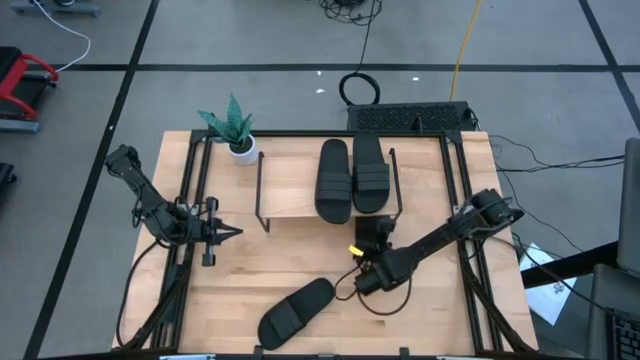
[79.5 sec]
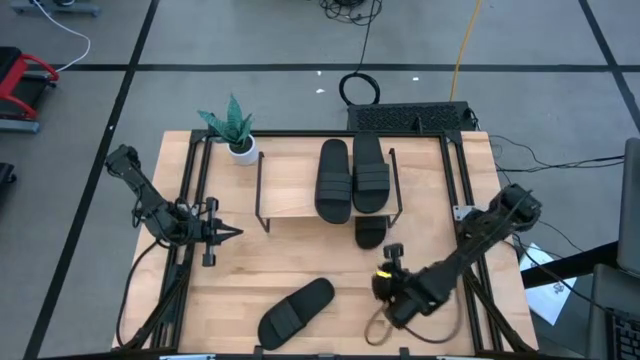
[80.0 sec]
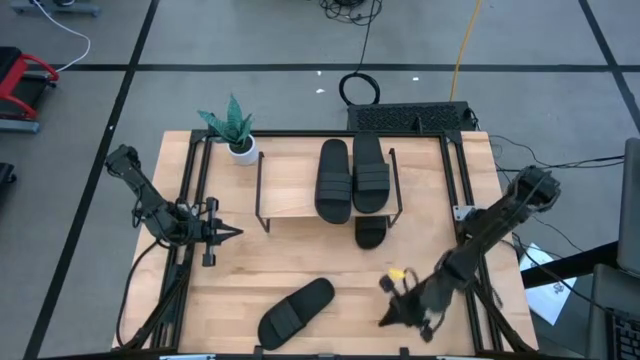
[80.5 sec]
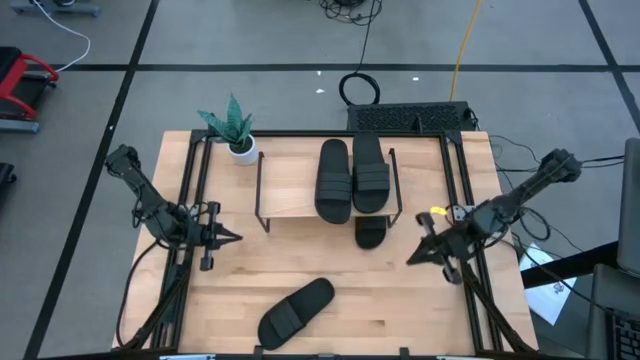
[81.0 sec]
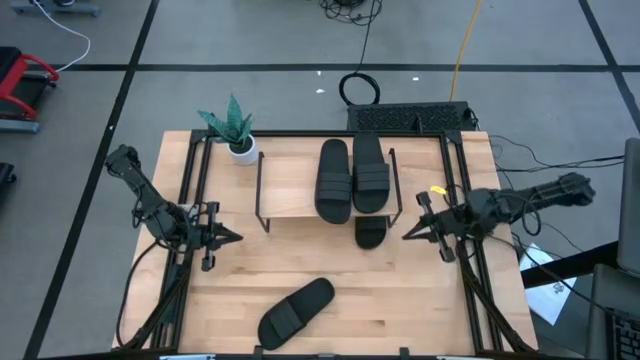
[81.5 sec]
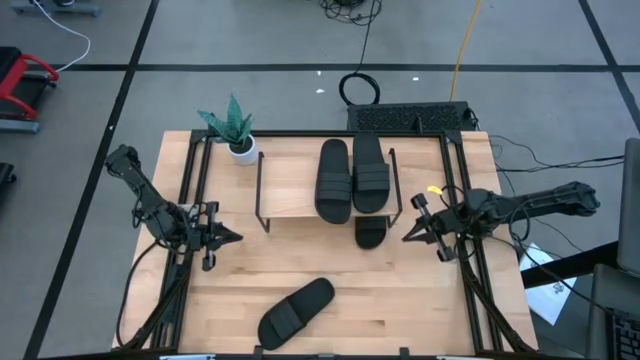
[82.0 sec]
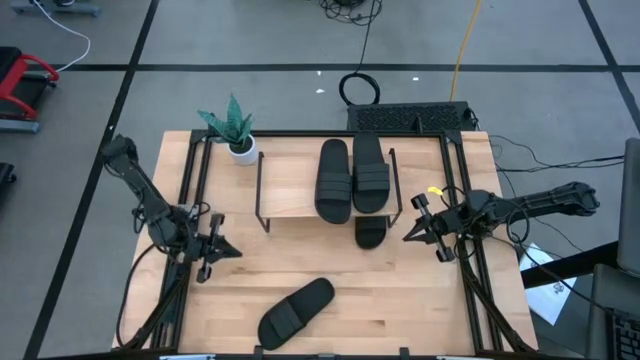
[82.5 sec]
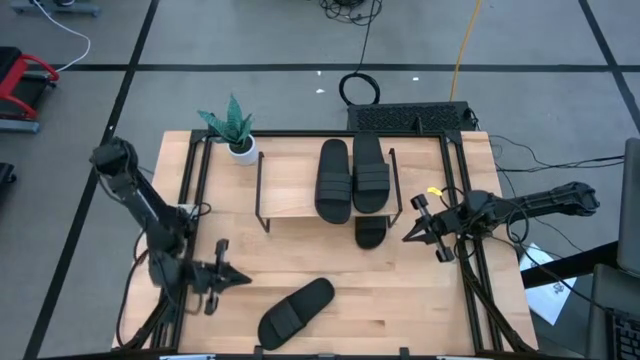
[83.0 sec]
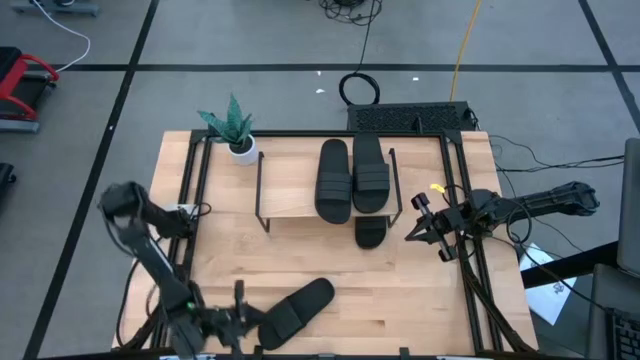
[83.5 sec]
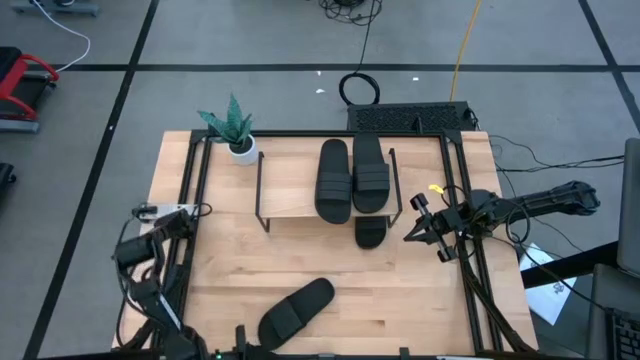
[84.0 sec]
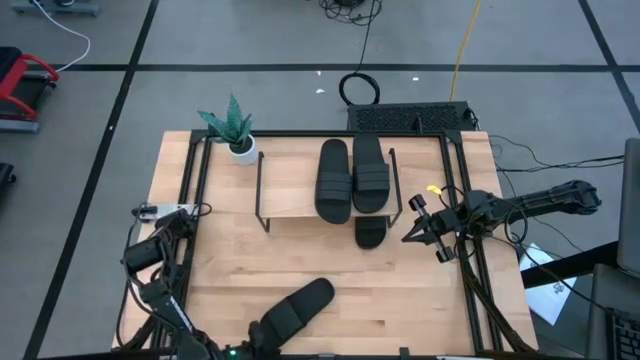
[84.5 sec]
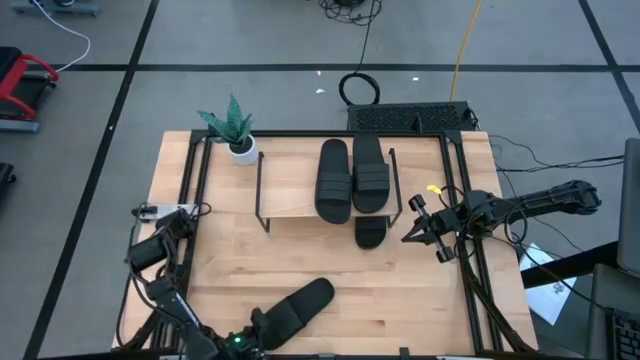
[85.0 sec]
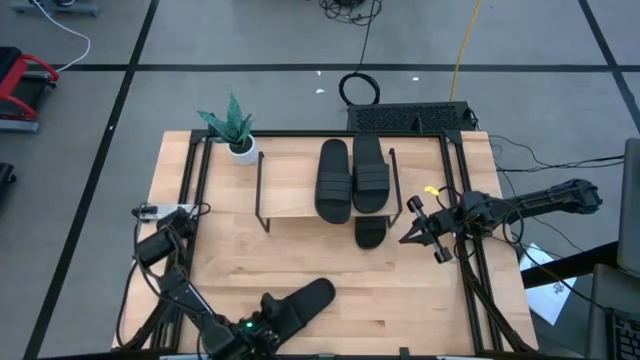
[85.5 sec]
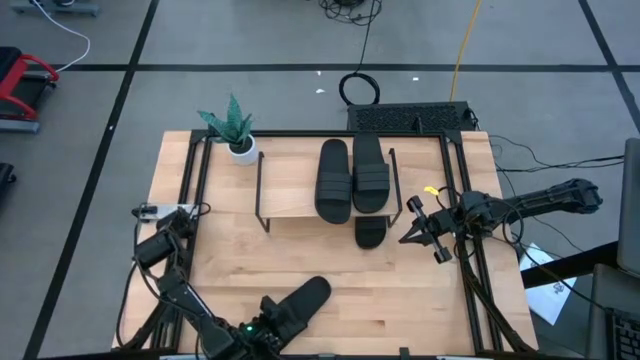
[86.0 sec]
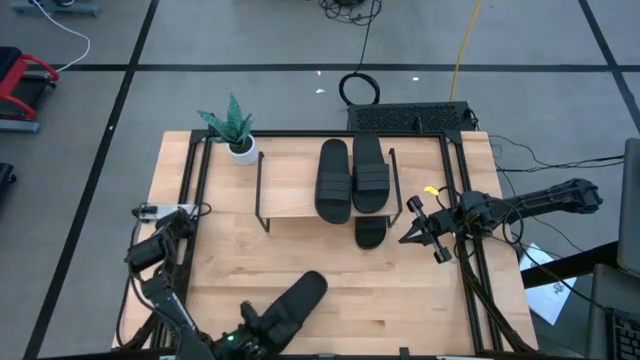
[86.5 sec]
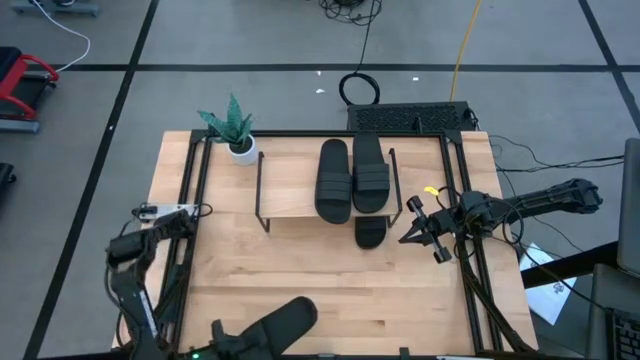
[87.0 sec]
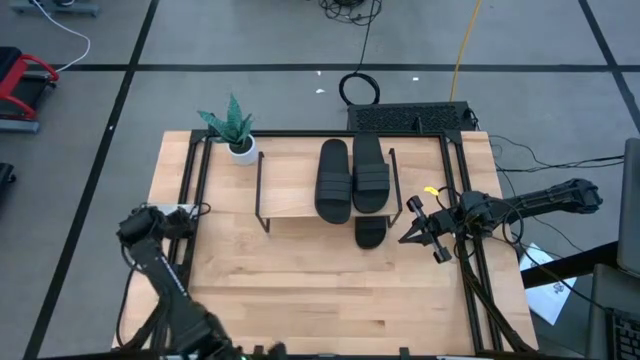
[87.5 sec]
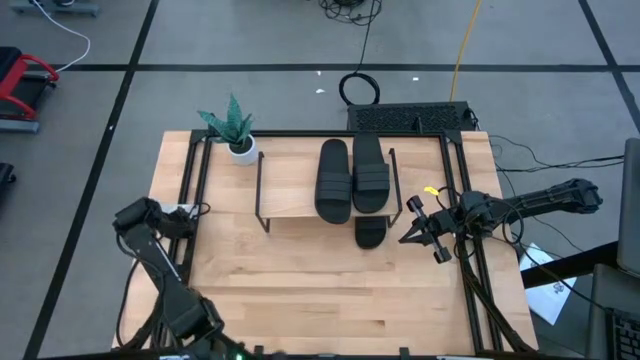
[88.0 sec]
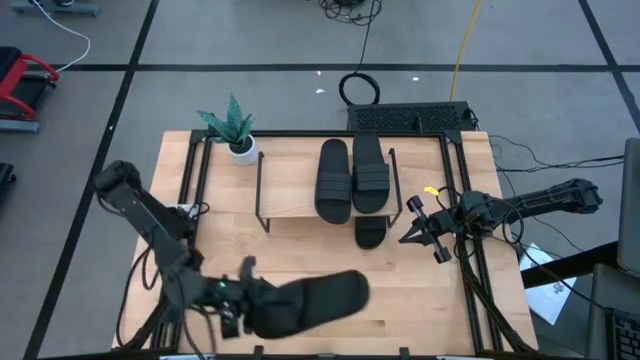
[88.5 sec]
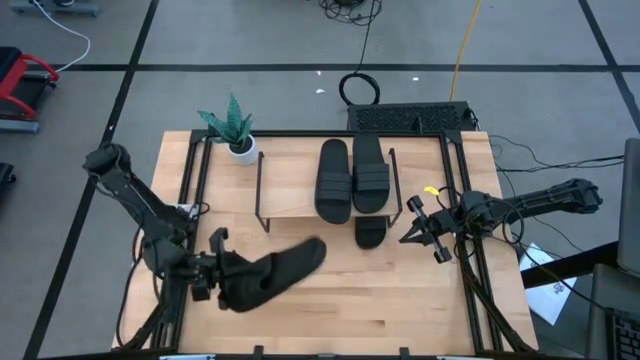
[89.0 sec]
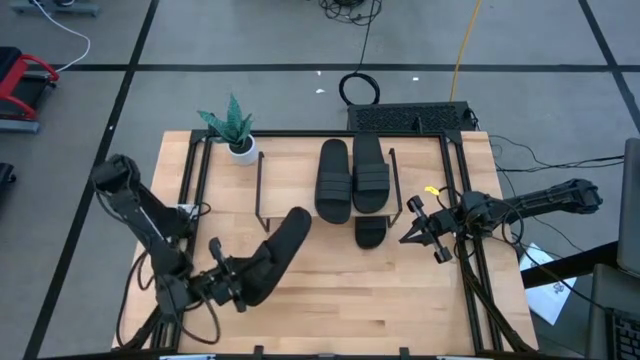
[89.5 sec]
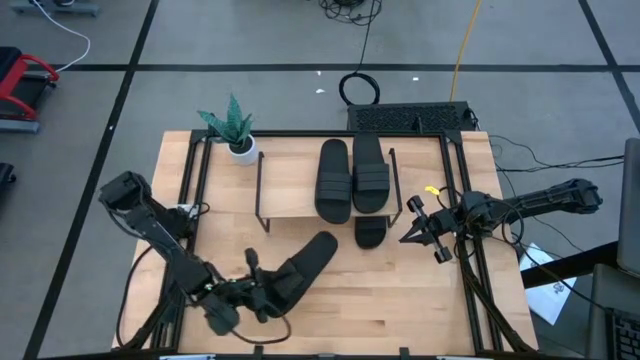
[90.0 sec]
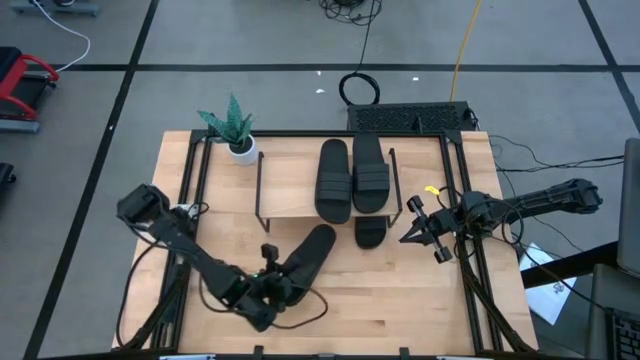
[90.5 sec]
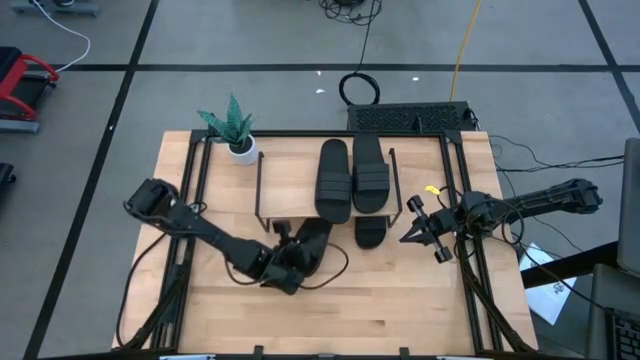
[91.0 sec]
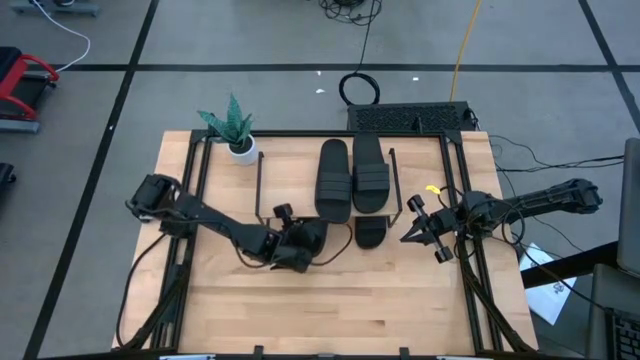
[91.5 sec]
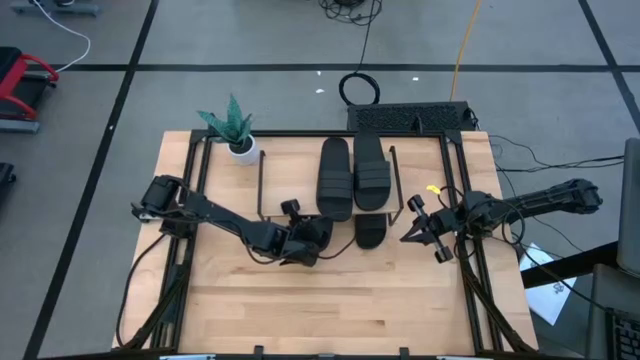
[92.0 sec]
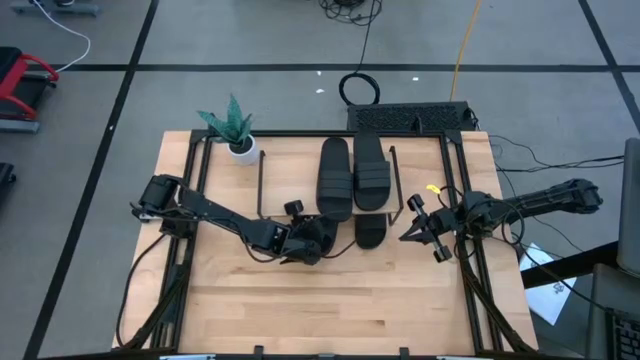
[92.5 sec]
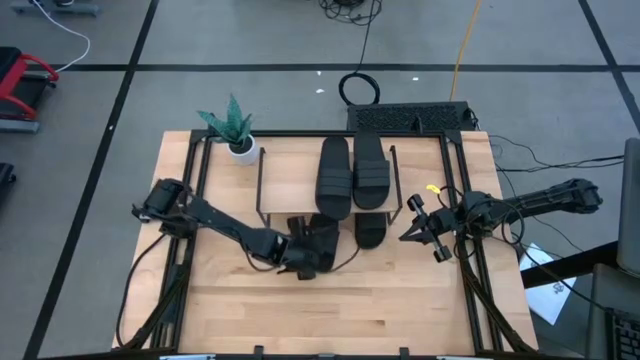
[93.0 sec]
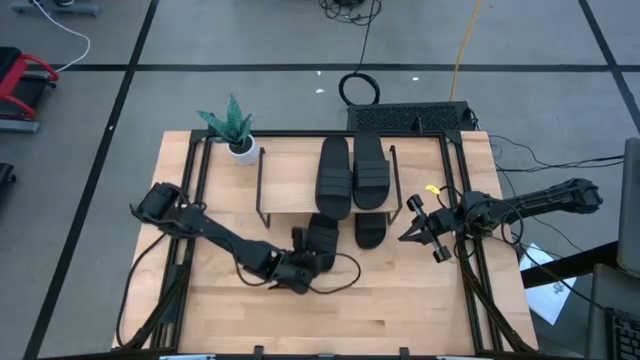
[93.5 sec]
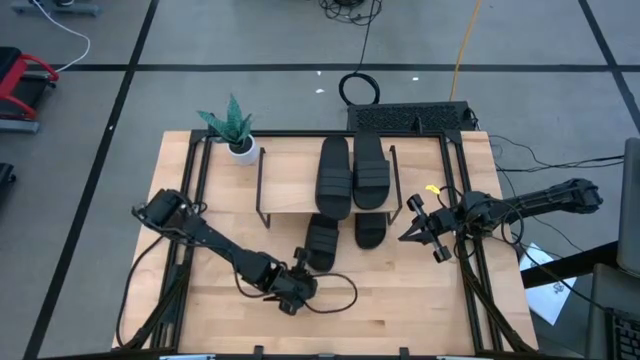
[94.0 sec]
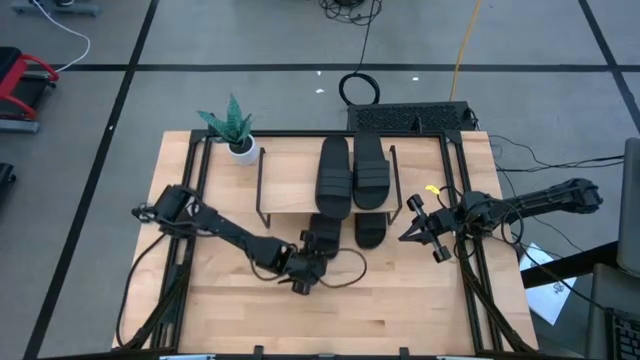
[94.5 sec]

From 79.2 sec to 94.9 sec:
Task: Pick and place slides into the shelf
Put the black slide under the shelf

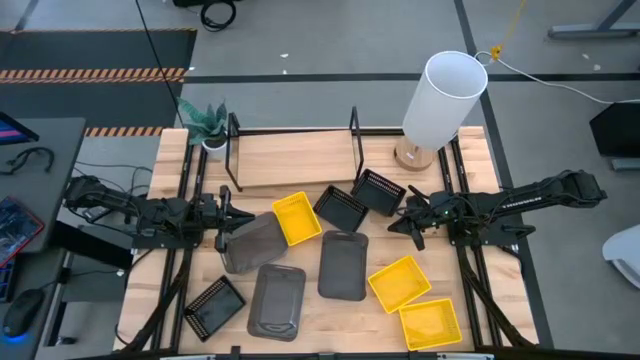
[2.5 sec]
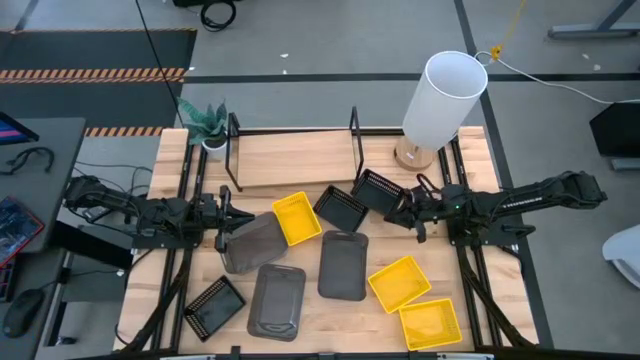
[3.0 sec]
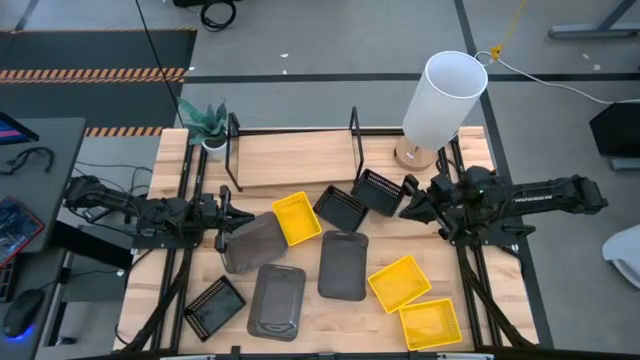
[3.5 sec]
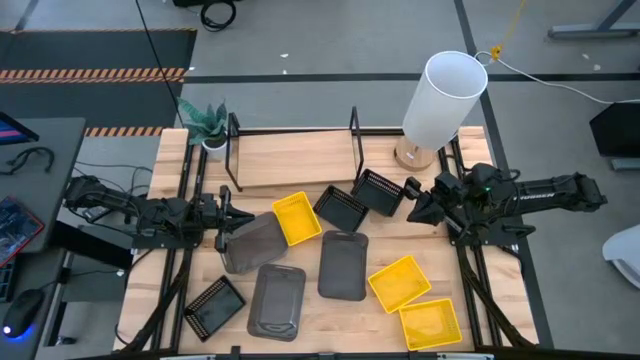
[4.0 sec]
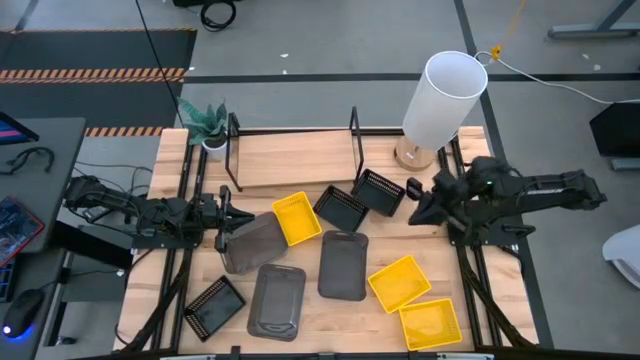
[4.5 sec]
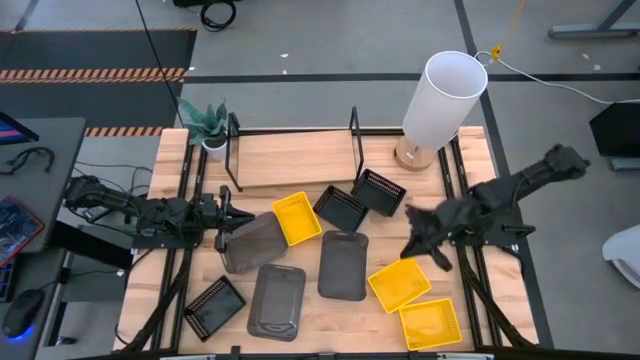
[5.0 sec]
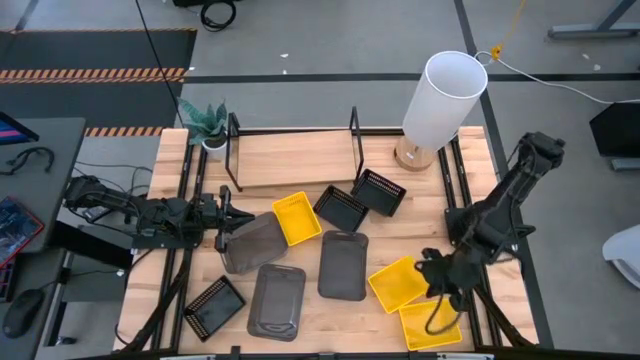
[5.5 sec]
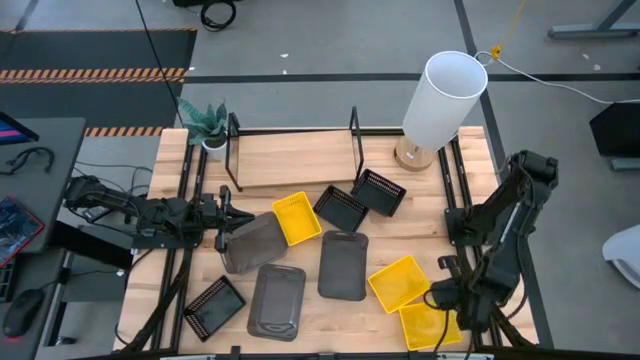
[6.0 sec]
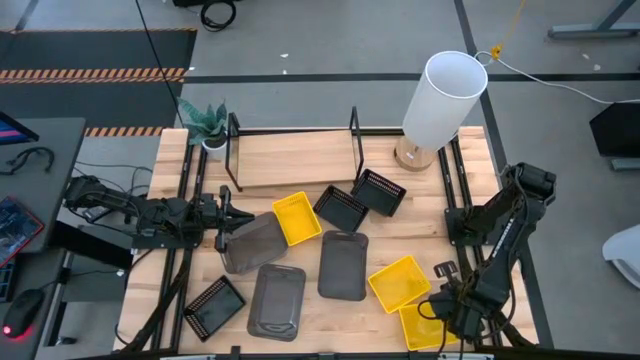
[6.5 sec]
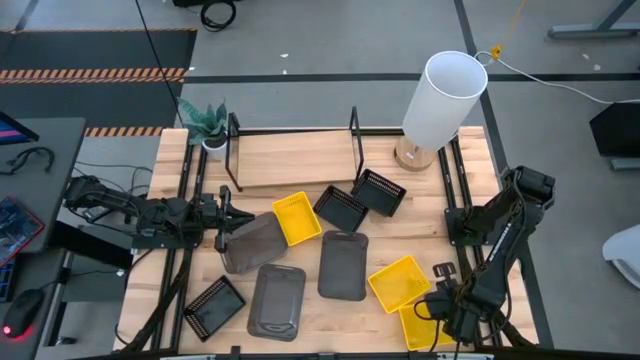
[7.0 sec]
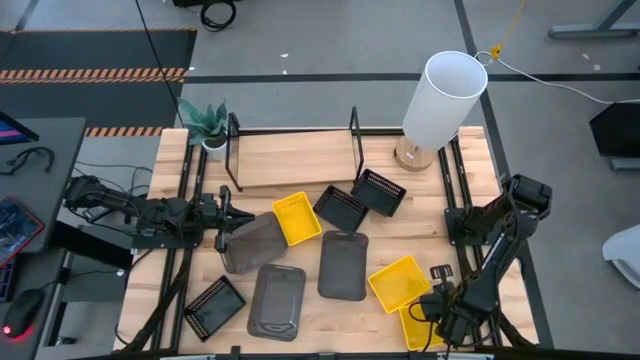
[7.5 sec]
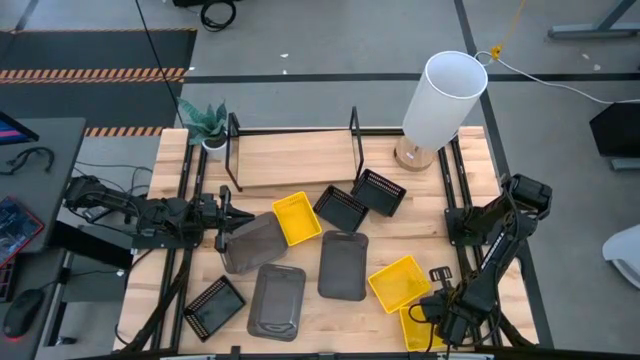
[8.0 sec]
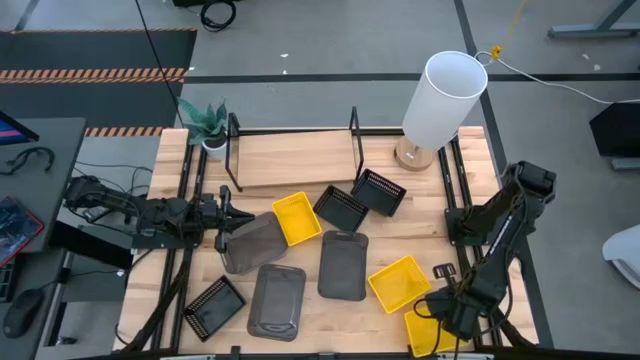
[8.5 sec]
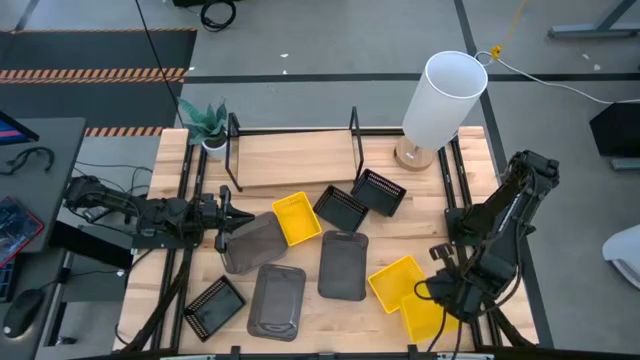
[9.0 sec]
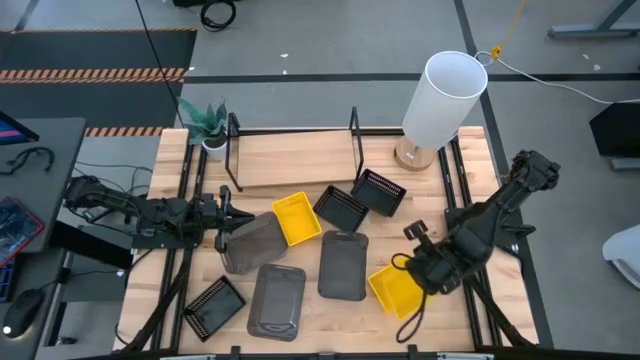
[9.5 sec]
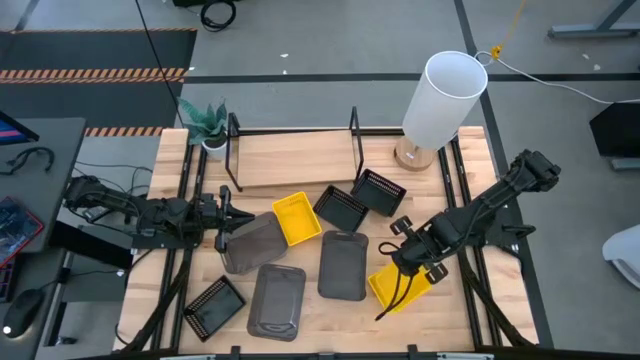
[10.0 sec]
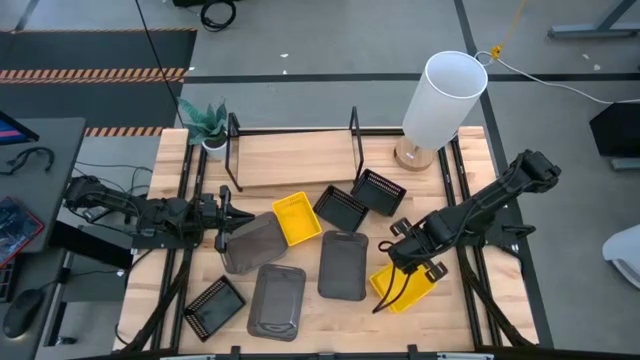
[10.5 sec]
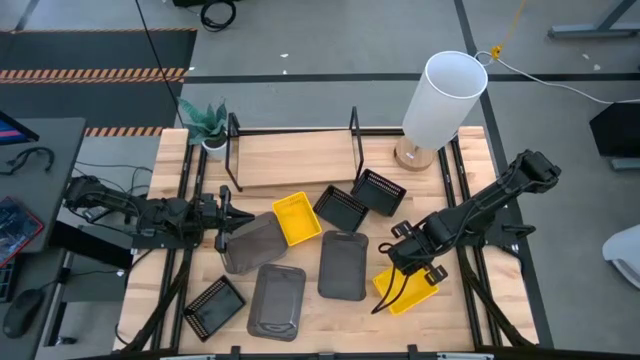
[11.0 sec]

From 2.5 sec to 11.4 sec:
Task: Stack baskets on shelf by color
Stack the bottom yellow bin on top of the yellow bin
